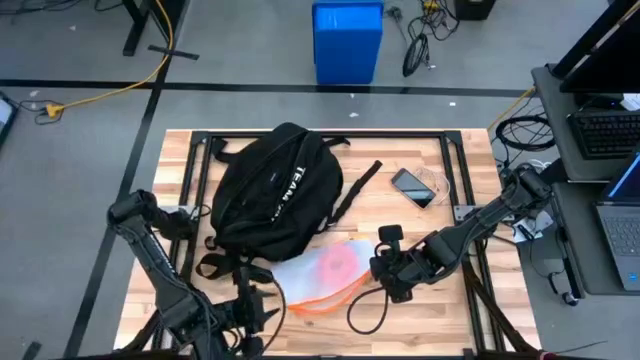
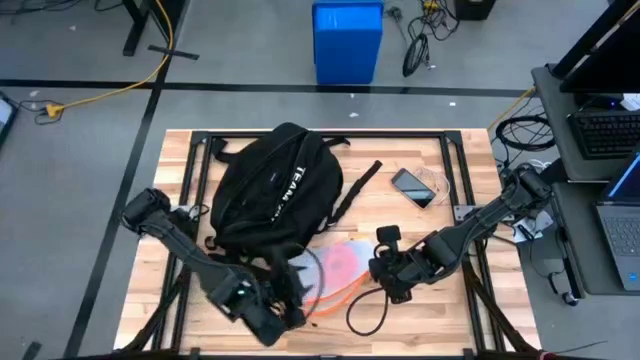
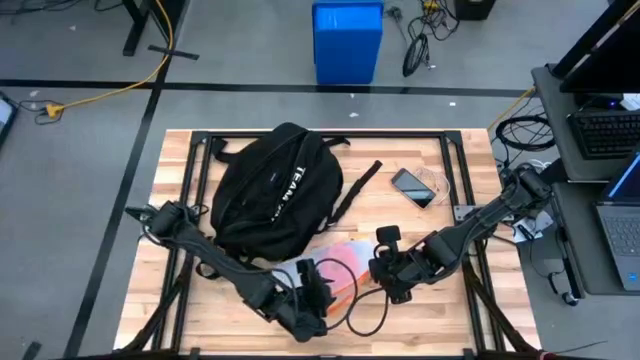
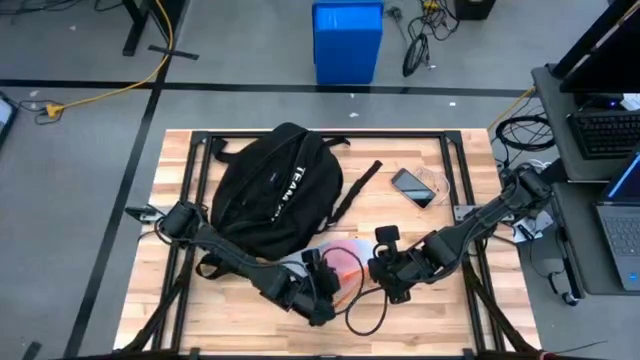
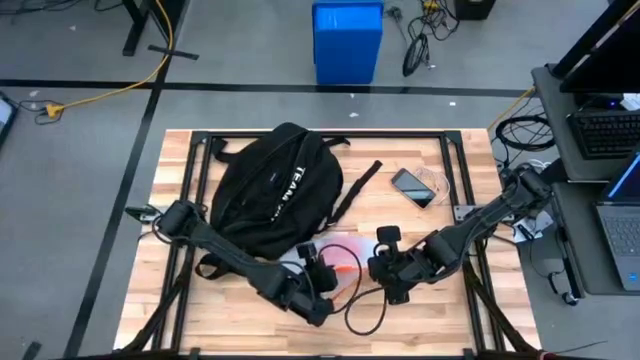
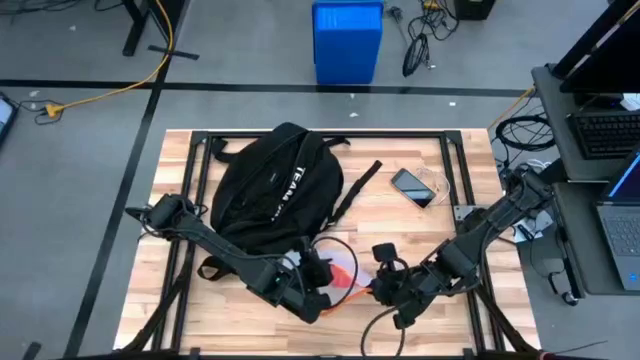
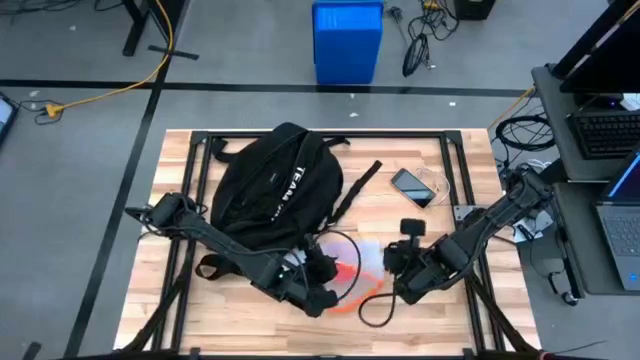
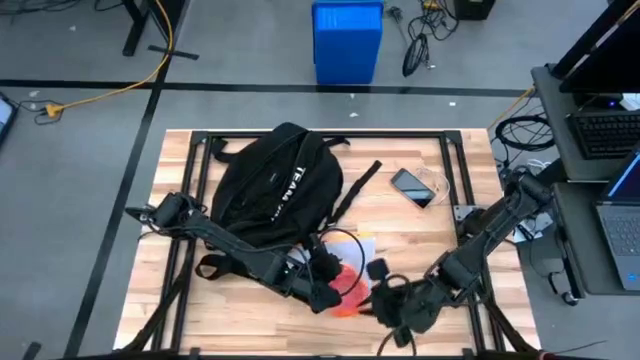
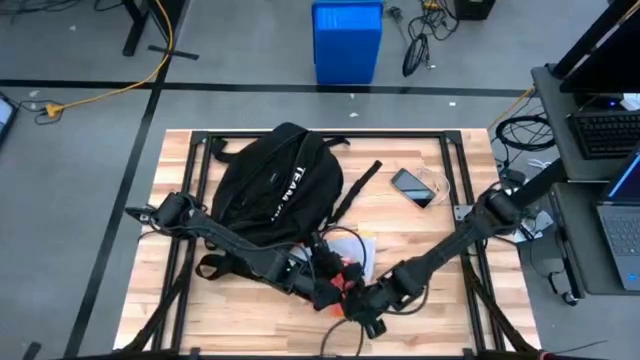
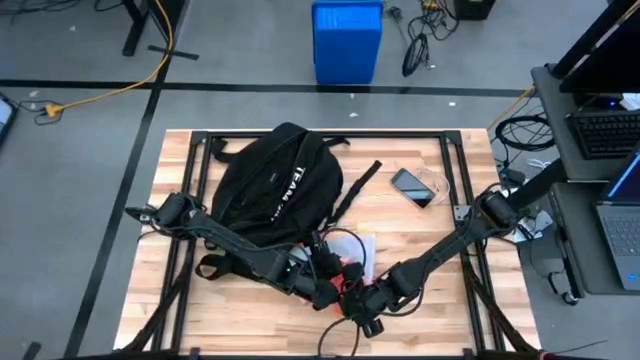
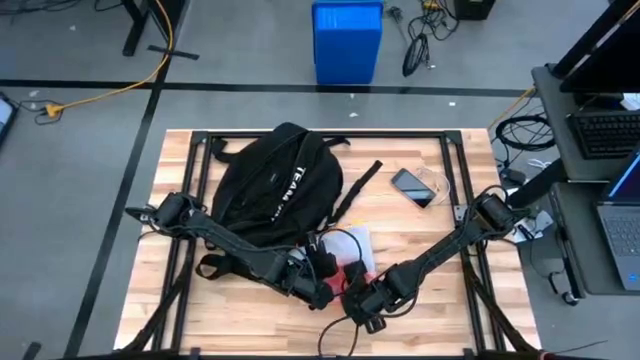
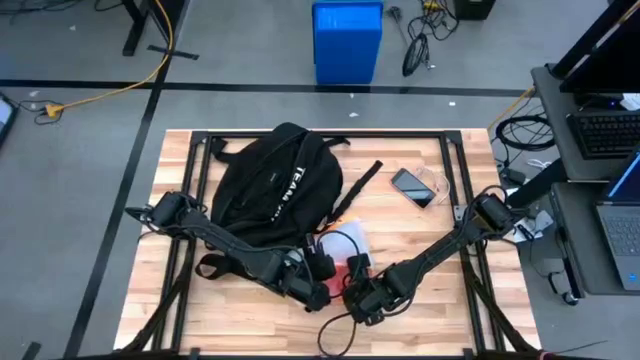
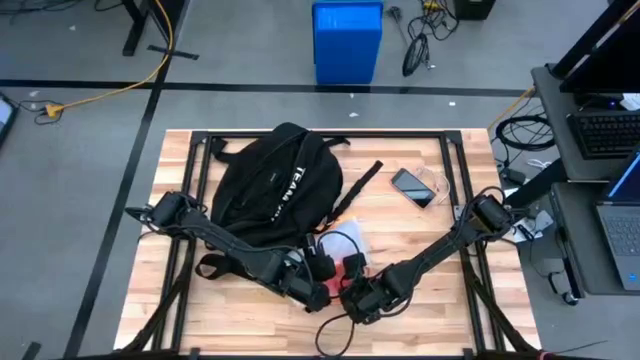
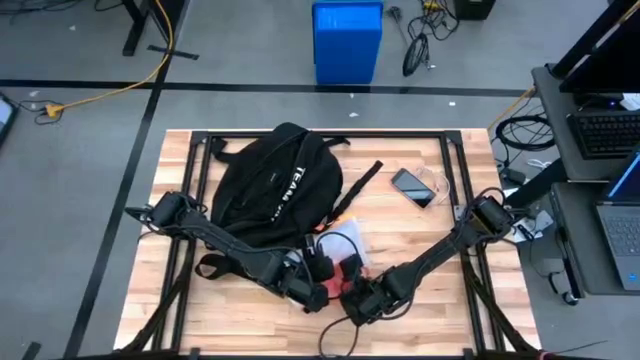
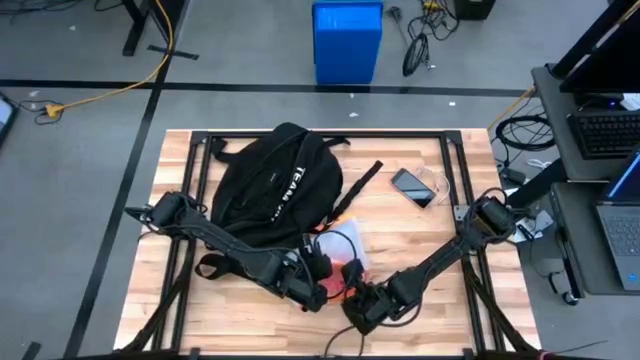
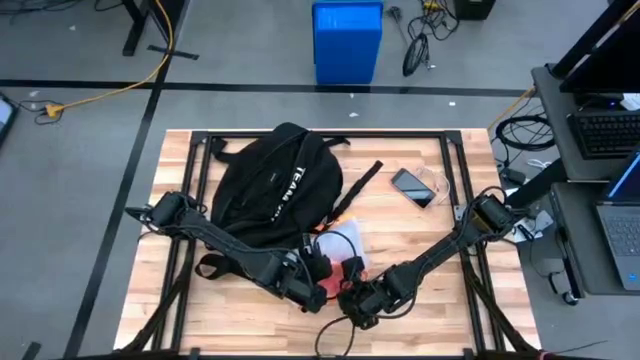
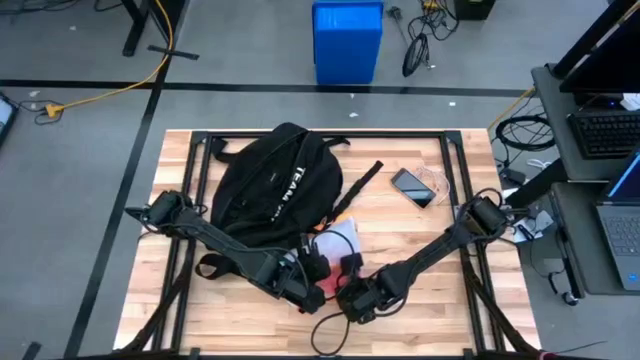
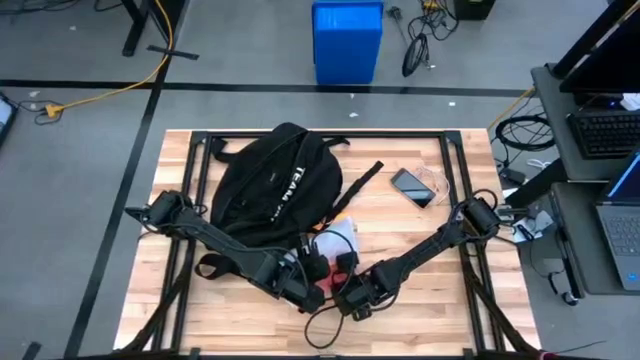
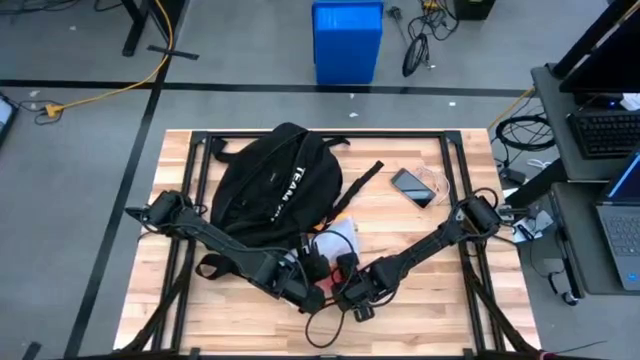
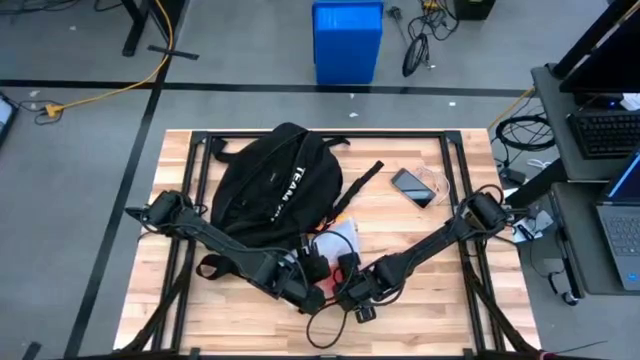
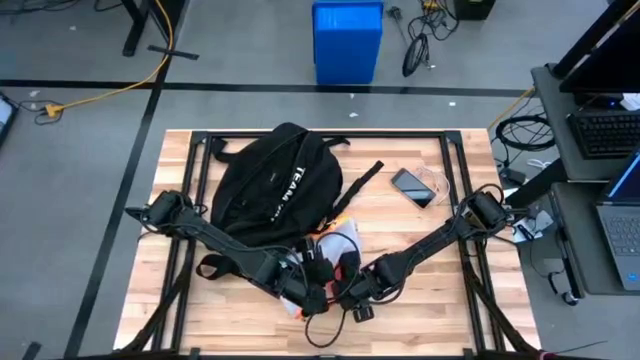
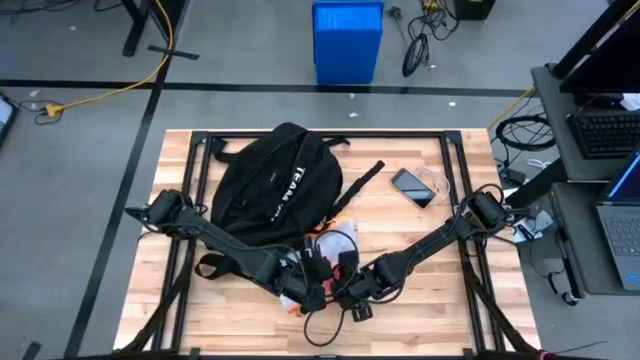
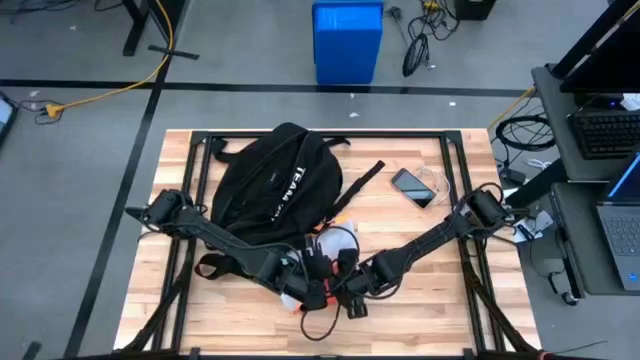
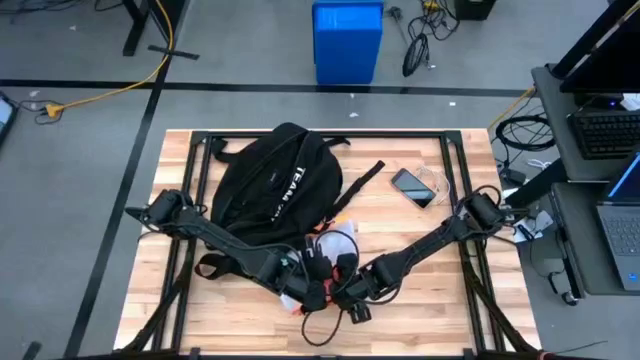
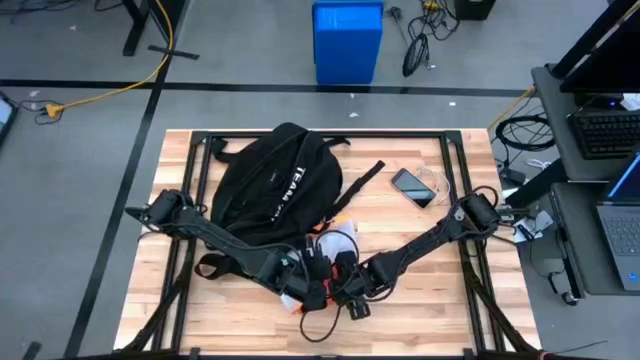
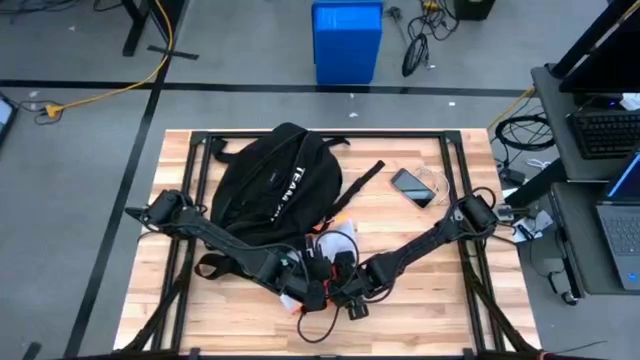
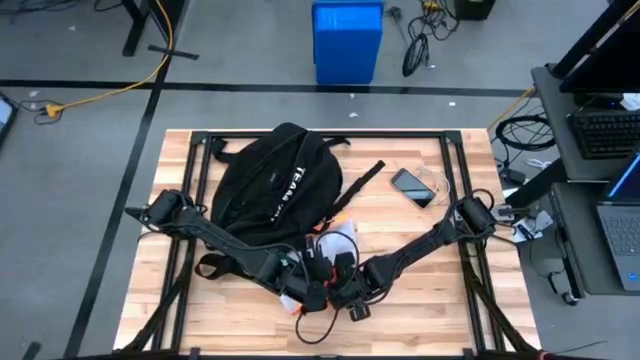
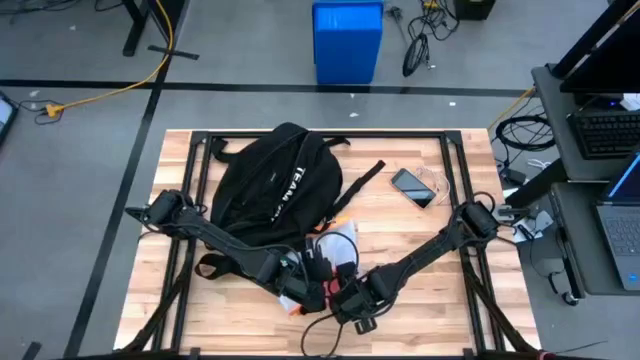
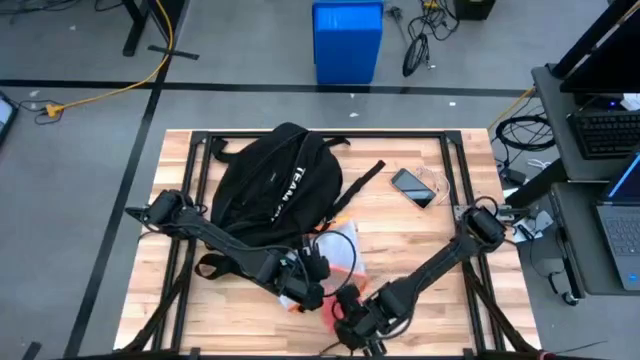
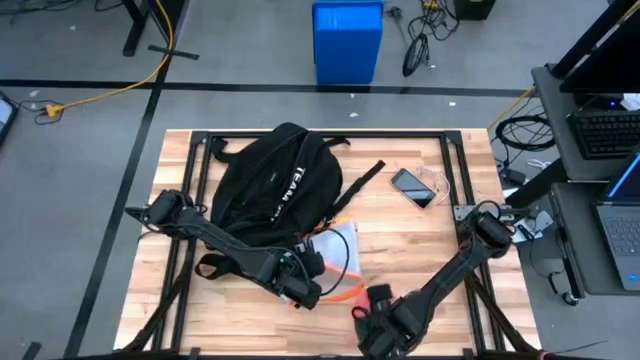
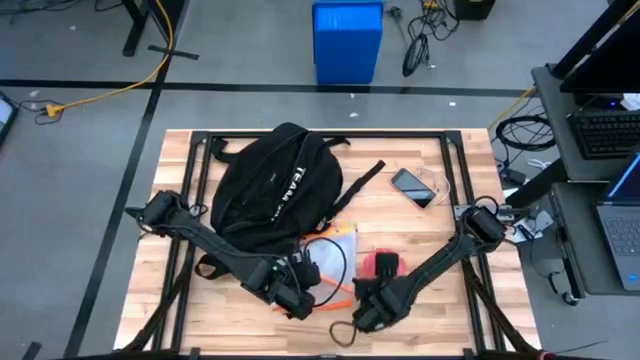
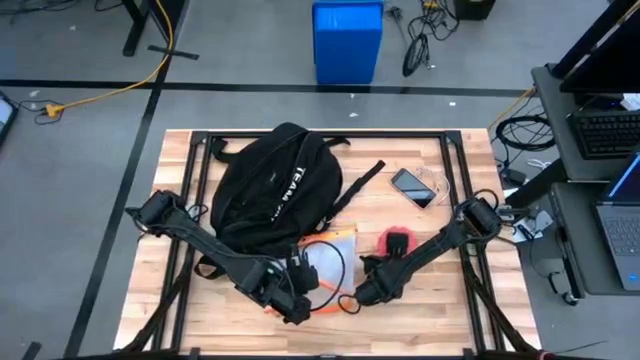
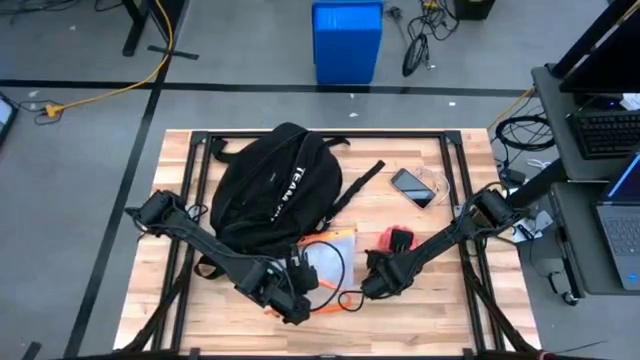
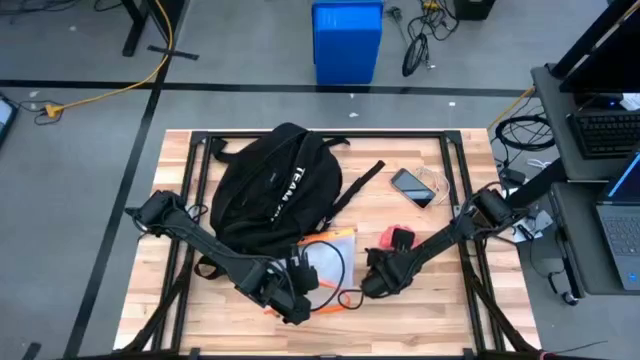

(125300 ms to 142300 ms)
Task: Unpack backpack
Remove the pill organizer from the orange zip bag

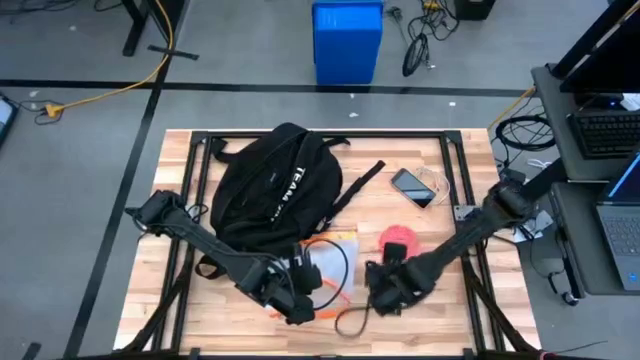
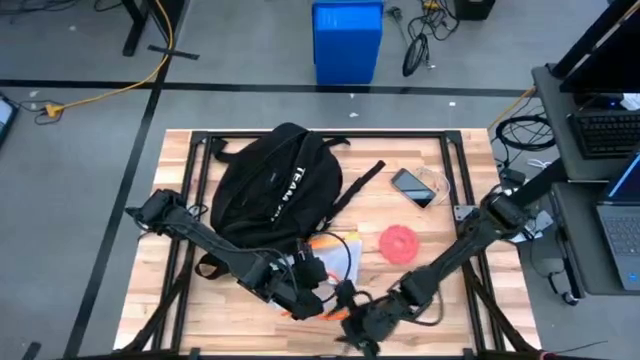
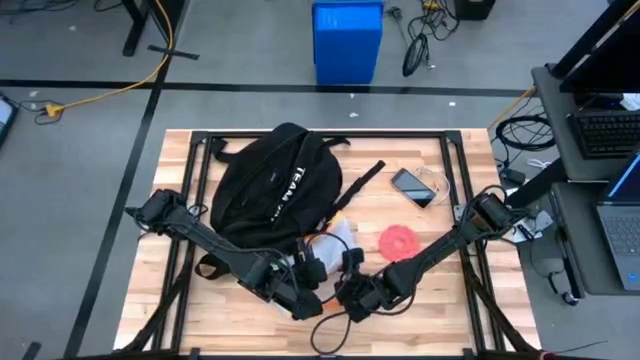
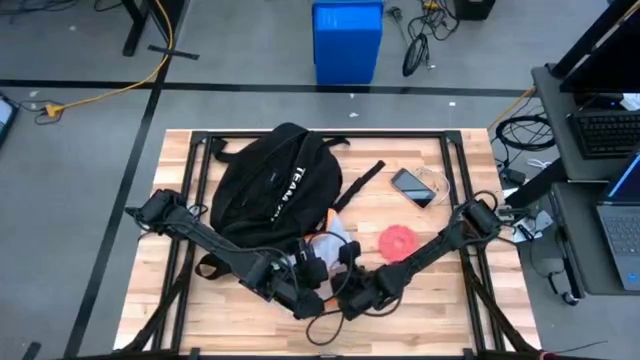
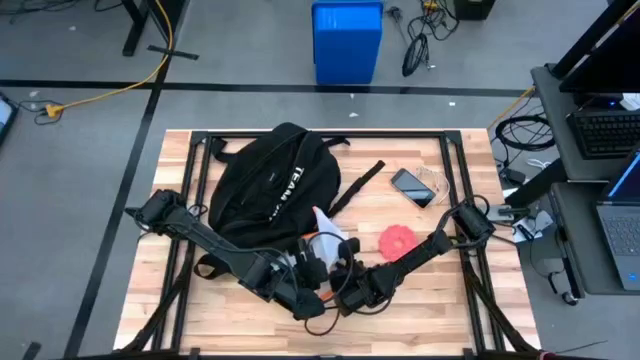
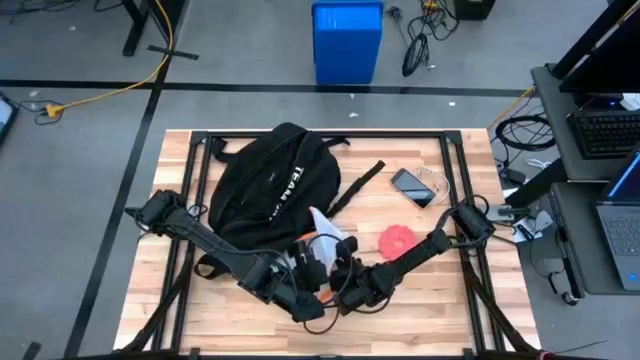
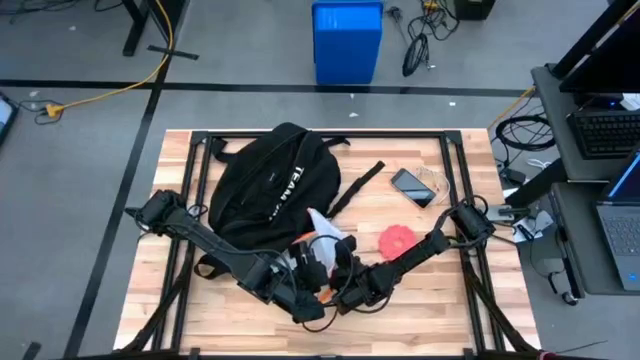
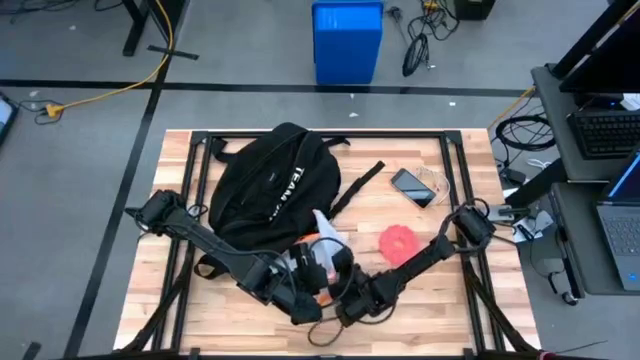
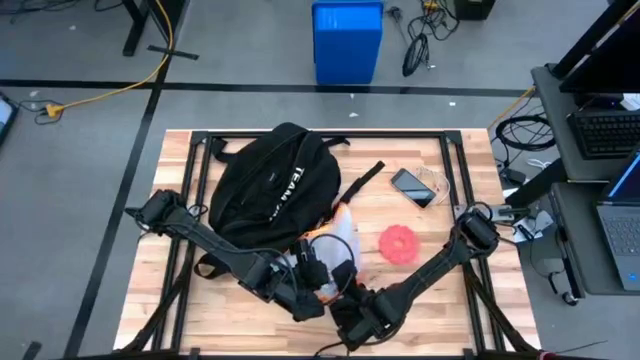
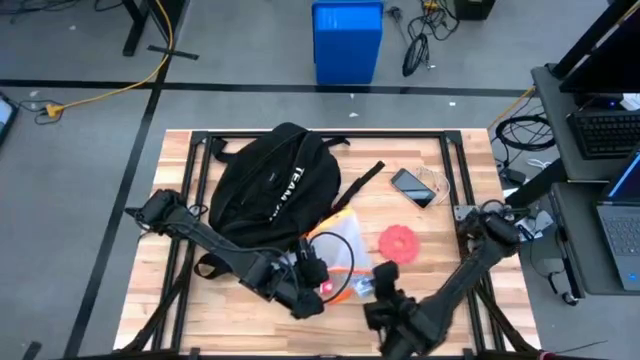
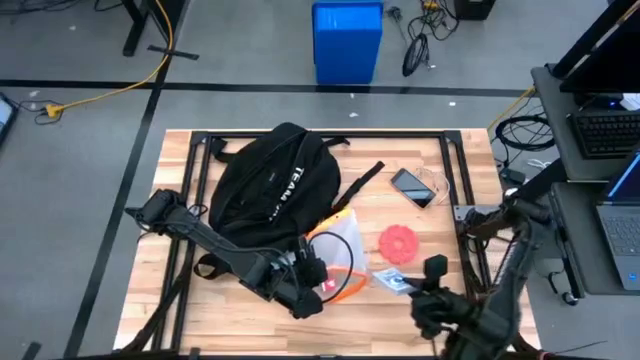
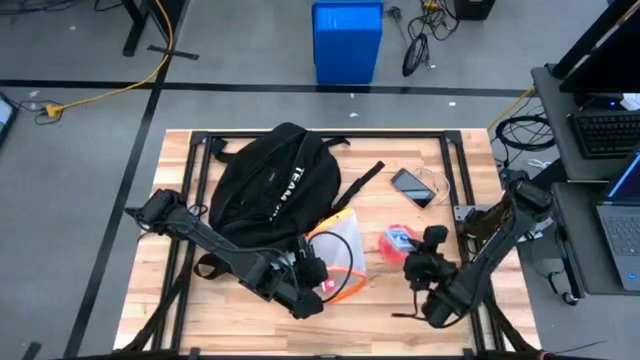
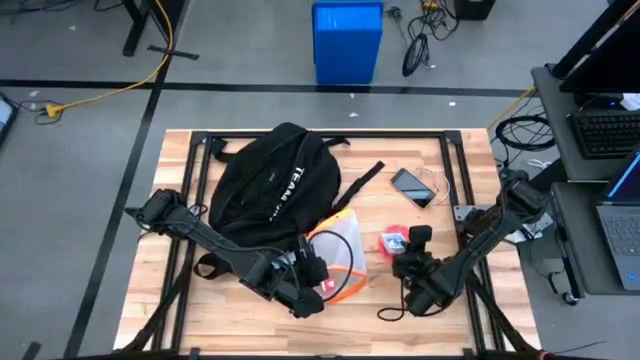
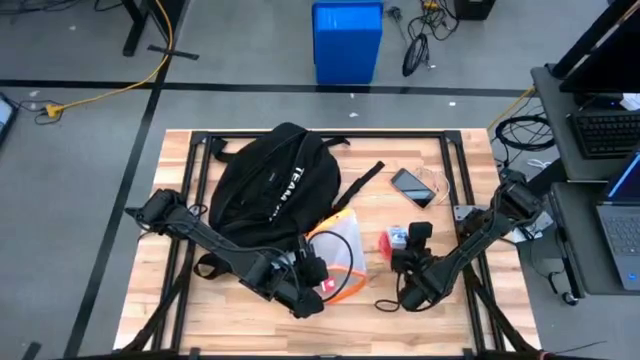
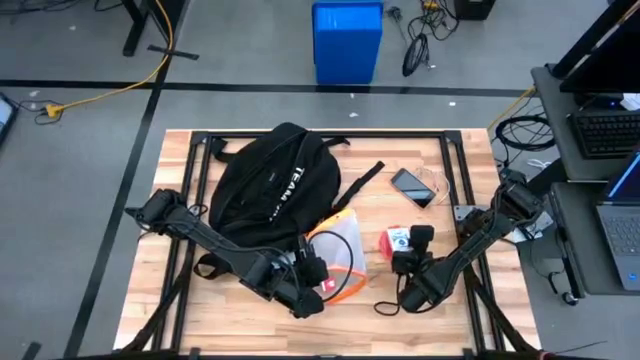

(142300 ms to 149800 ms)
Remove the card pack from the orange zip bag
